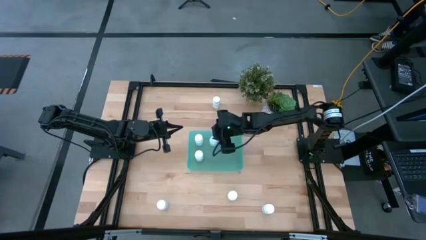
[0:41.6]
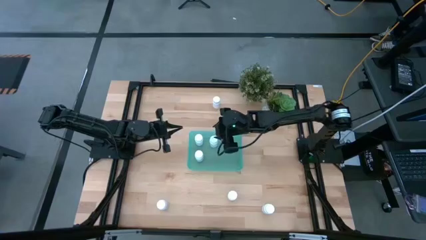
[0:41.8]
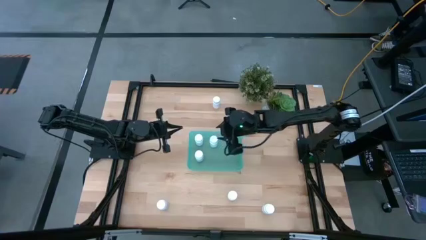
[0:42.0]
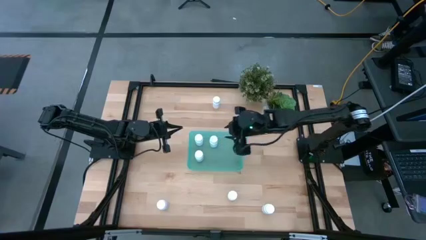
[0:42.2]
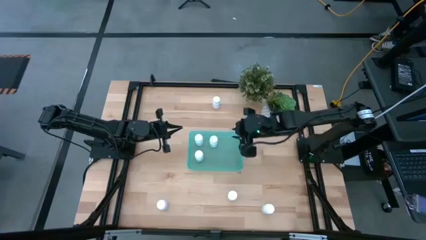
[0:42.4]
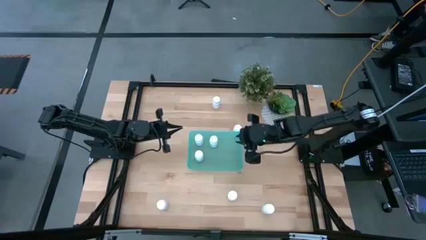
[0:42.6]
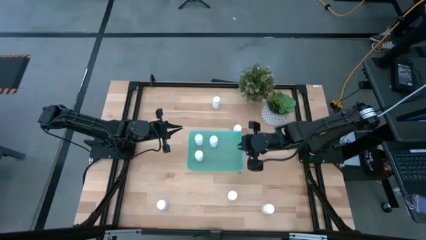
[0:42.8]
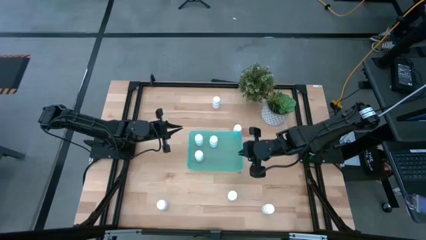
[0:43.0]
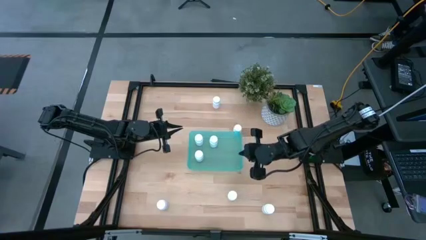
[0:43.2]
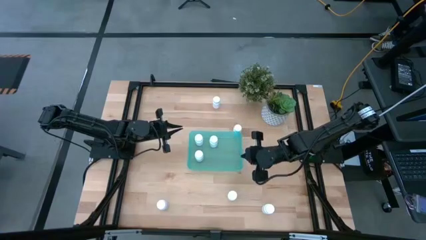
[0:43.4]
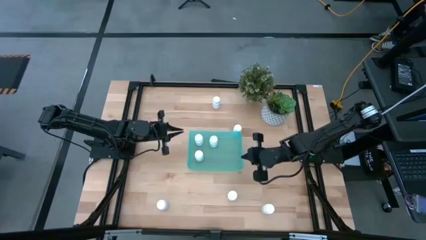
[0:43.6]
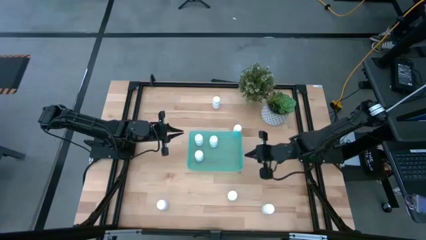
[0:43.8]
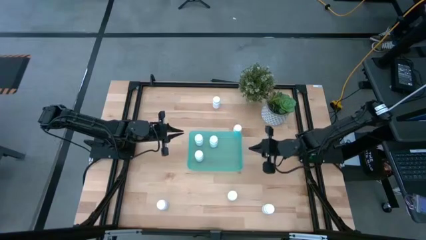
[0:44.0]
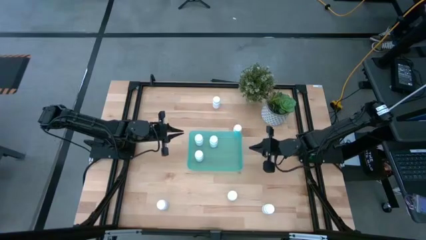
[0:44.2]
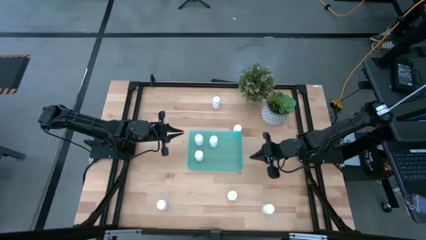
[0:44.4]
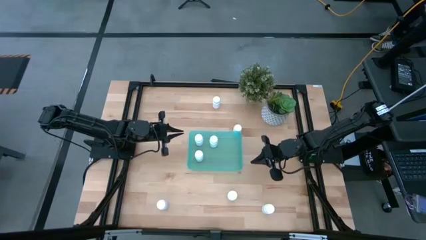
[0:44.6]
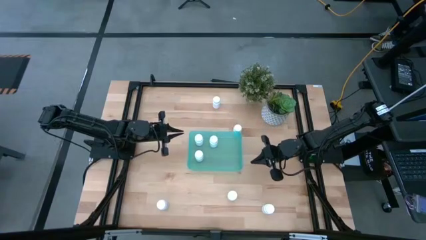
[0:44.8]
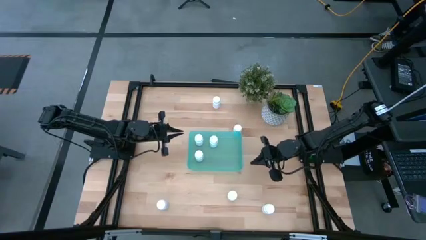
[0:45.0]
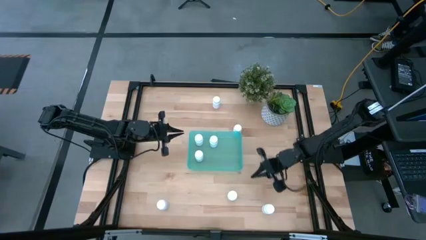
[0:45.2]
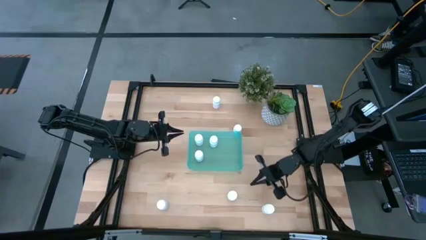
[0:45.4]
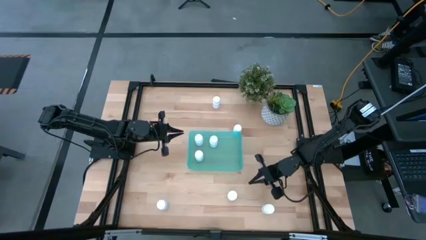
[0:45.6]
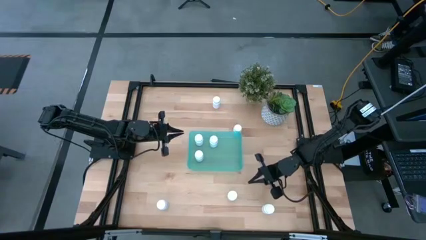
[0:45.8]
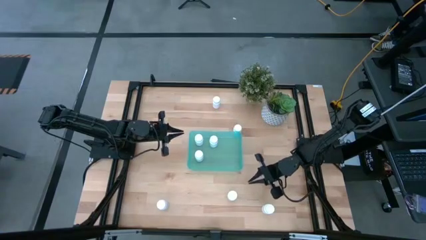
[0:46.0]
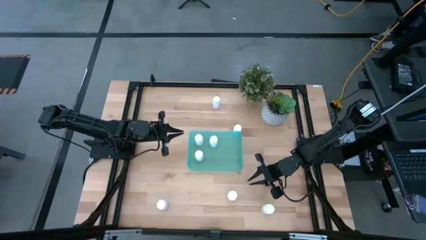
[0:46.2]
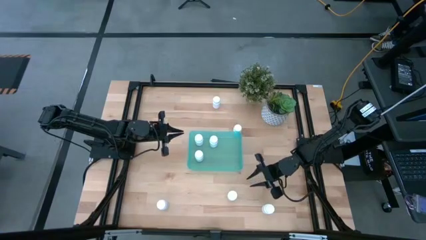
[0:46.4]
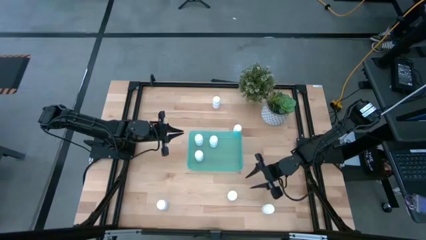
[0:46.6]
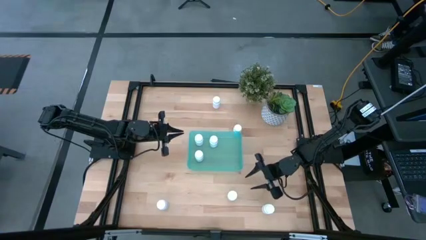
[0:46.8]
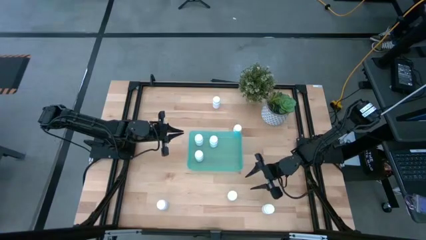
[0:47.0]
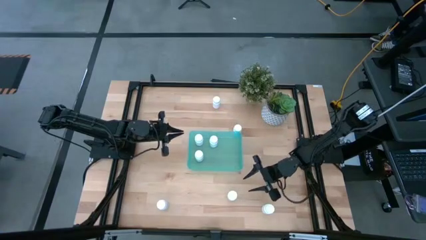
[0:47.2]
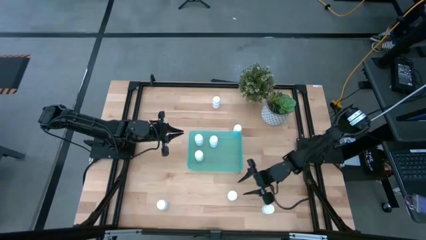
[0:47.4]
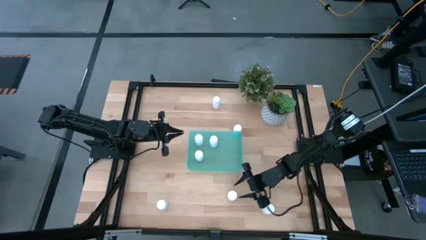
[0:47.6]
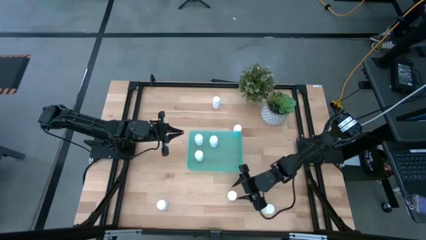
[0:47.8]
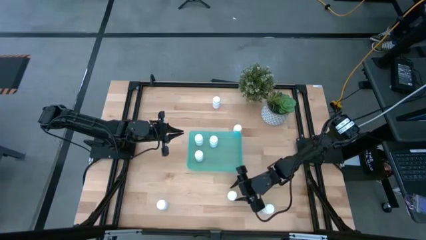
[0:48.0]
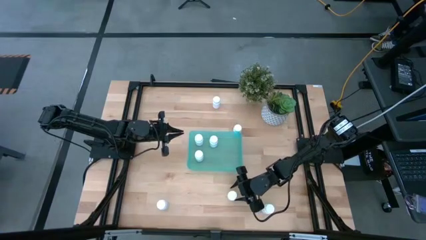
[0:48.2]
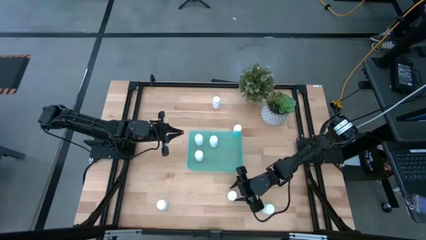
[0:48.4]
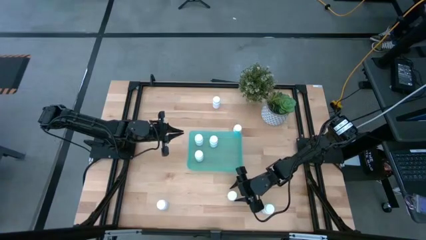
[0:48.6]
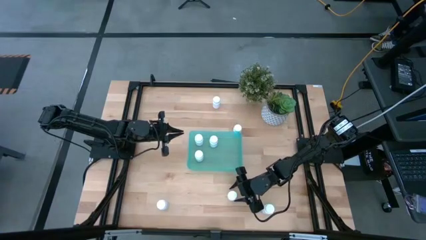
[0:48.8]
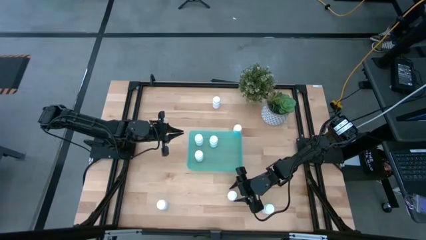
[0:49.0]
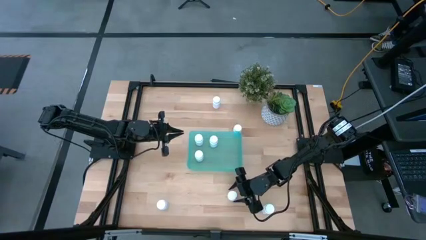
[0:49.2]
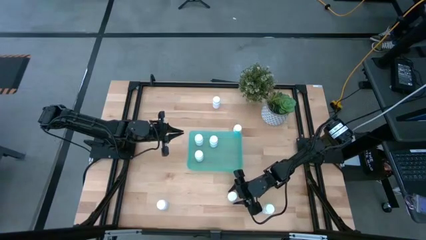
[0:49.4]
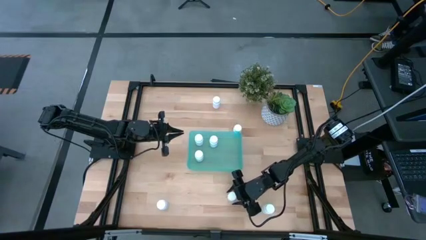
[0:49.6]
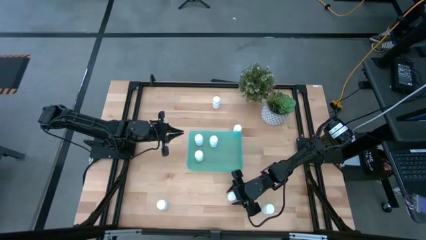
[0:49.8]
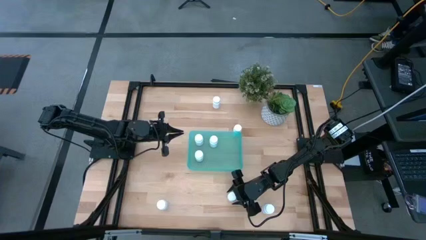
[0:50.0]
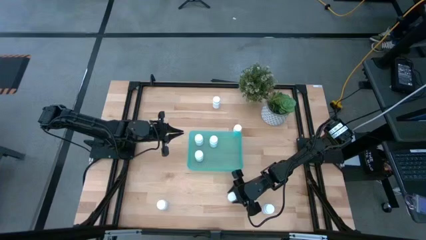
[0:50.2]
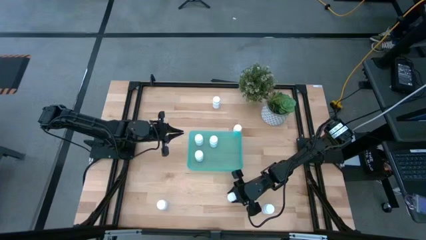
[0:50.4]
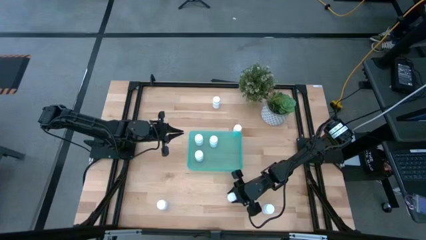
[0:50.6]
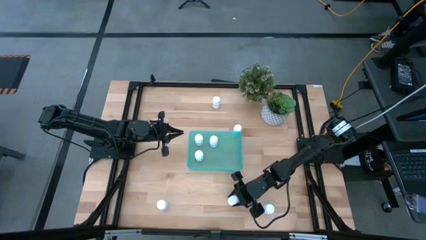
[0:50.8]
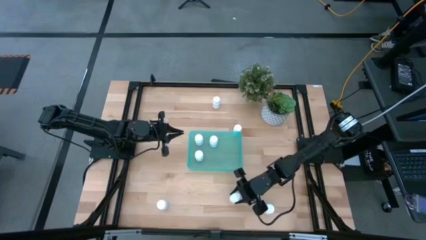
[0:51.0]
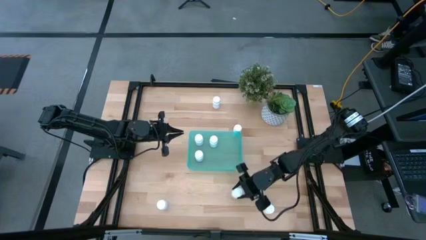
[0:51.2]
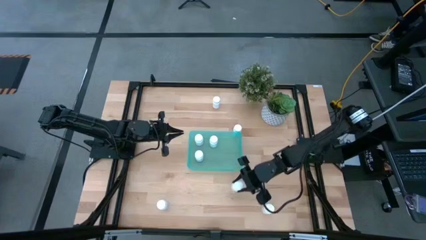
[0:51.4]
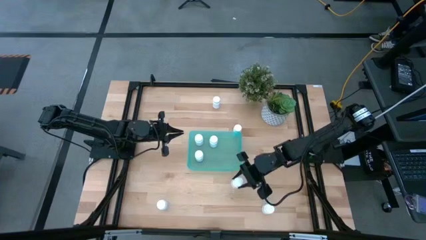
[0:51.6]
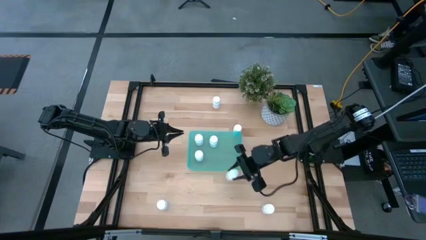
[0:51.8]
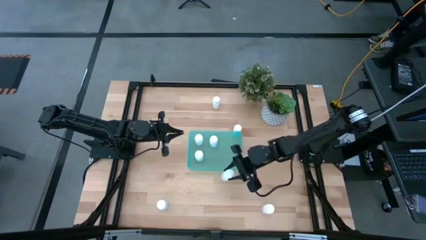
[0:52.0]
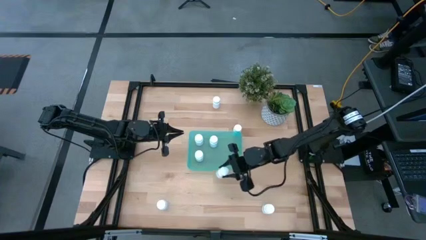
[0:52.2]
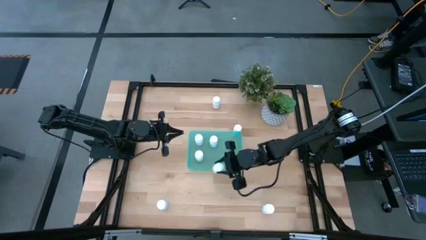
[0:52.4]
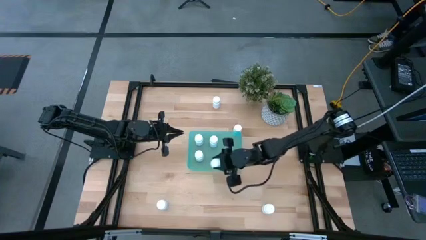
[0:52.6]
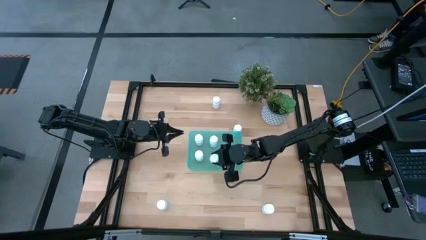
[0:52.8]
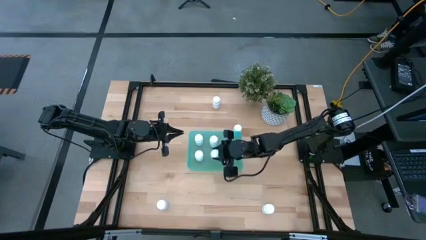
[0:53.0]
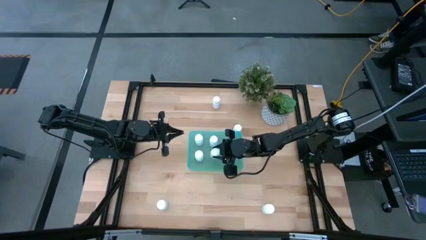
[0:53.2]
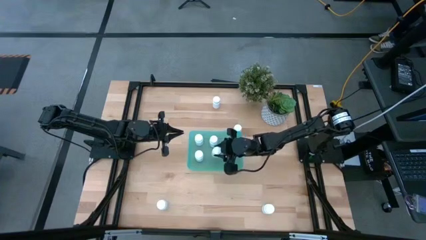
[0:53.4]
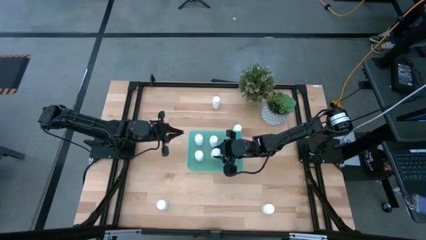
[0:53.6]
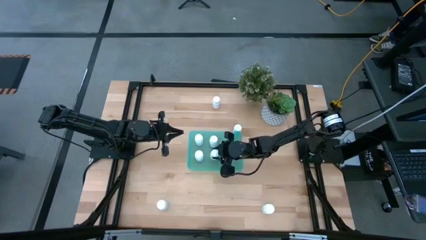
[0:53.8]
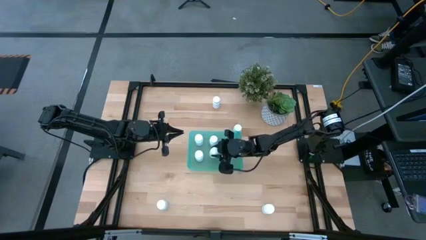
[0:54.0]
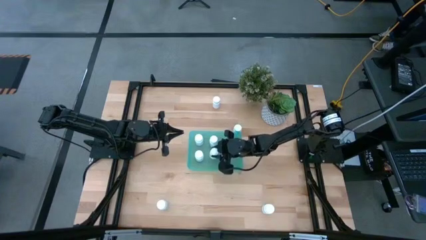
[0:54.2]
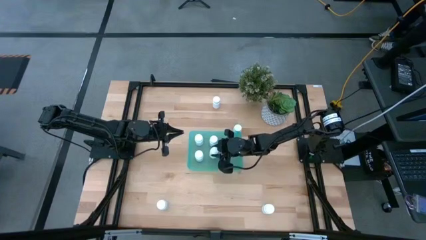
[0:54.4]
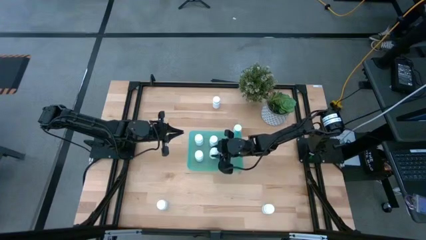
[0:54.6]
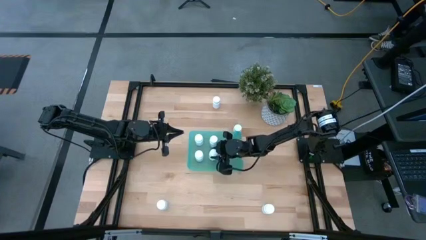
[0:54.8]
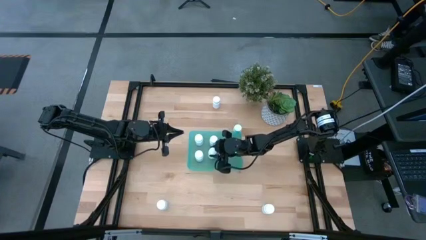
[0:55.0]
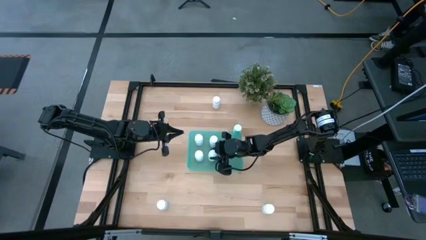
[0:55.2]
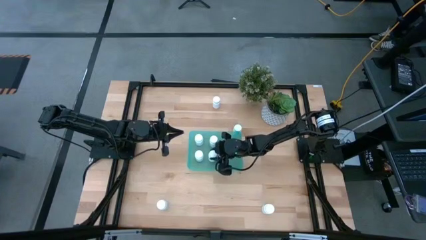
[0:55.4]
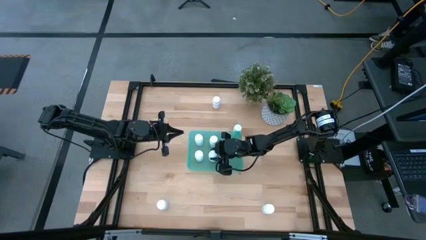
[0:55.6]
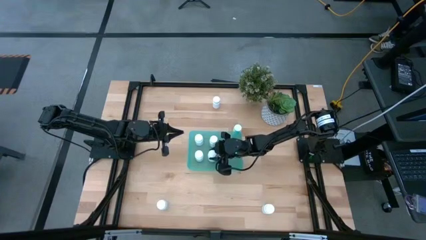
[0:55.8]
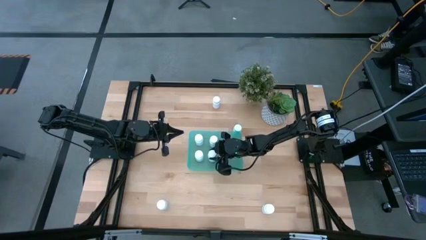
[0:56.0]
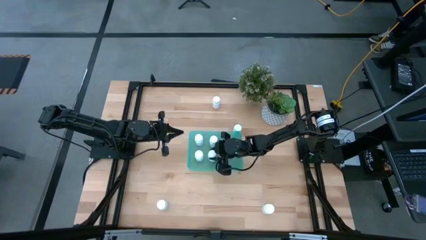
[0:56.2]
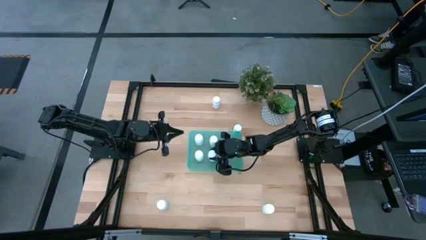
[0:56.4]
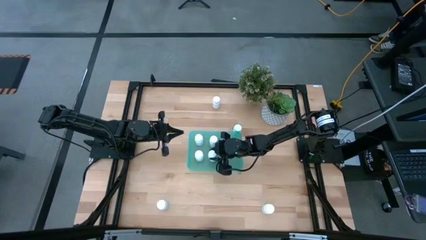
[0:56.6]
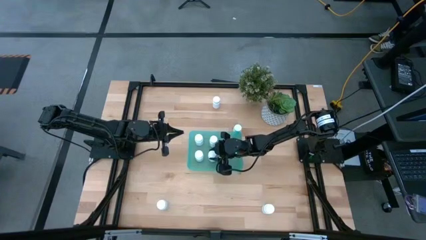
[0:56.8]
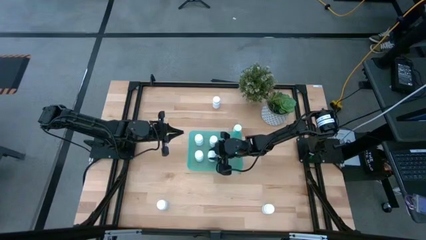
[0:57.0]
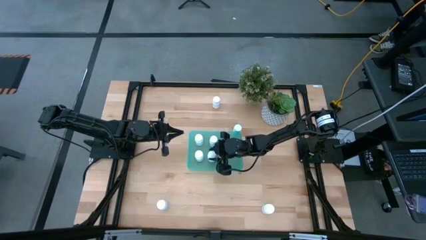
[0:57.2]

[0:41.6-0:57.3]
Task: Pick and place pill bottles into a basket
Put the white pill bottle into the blue bin
